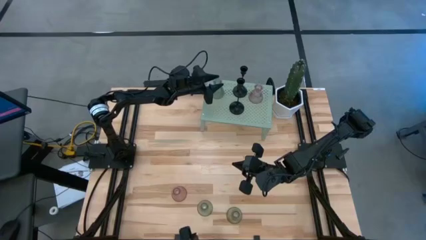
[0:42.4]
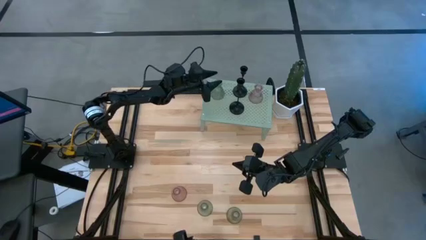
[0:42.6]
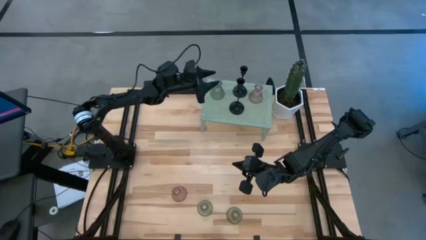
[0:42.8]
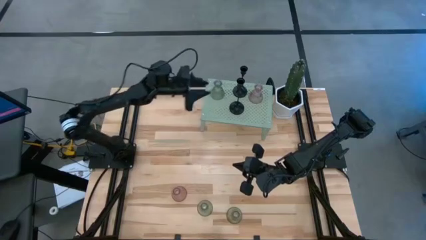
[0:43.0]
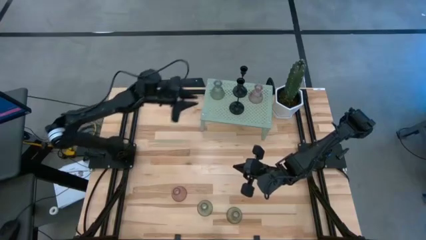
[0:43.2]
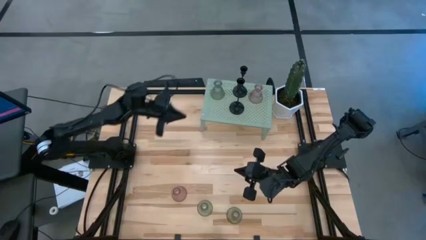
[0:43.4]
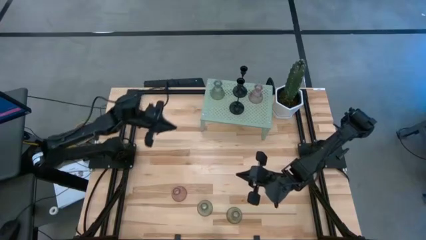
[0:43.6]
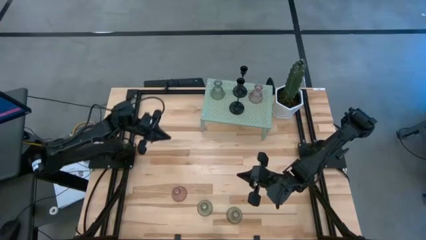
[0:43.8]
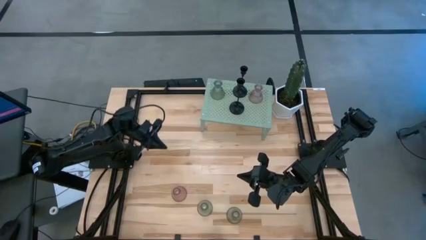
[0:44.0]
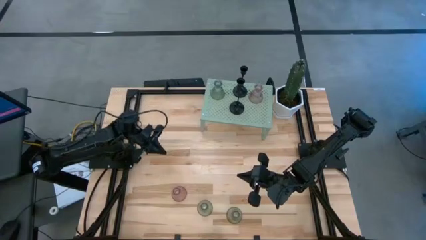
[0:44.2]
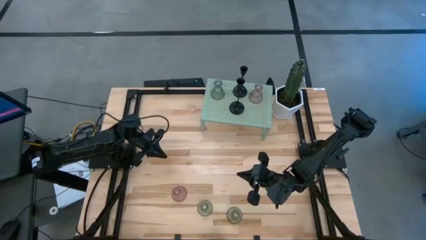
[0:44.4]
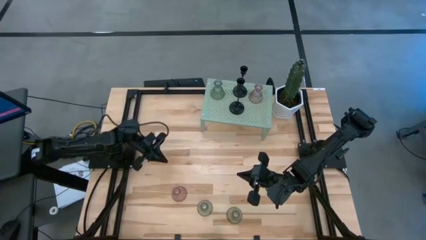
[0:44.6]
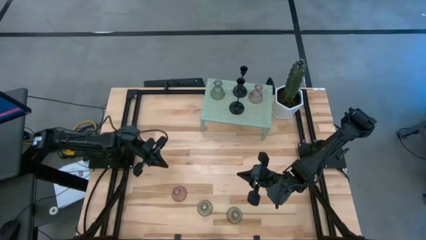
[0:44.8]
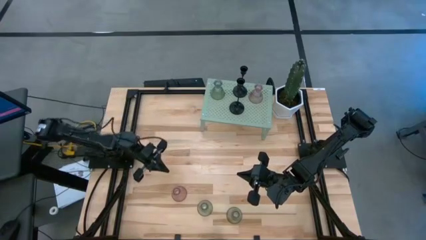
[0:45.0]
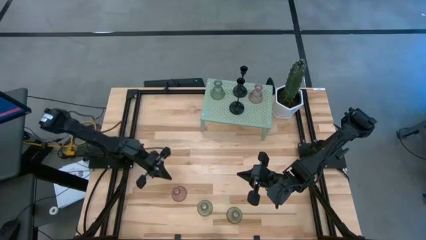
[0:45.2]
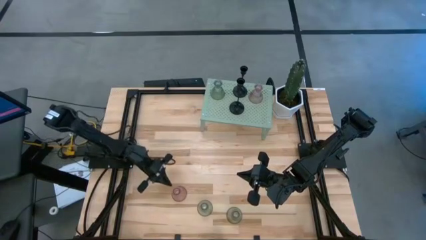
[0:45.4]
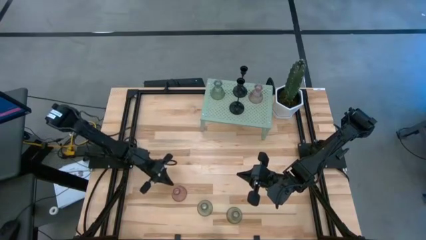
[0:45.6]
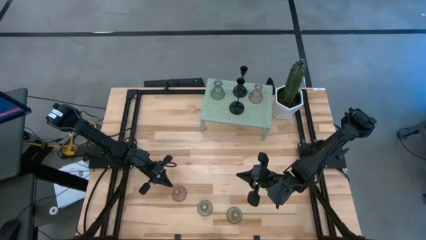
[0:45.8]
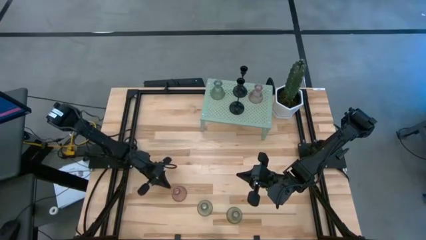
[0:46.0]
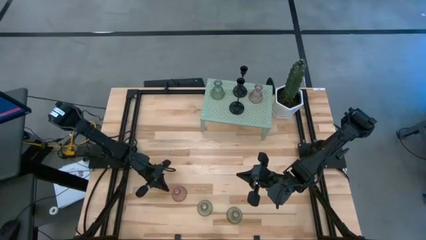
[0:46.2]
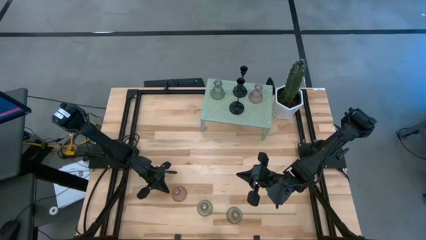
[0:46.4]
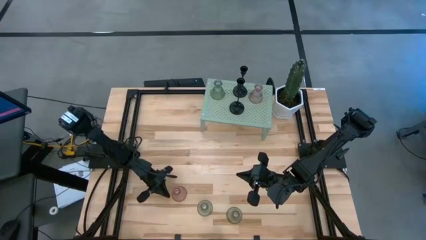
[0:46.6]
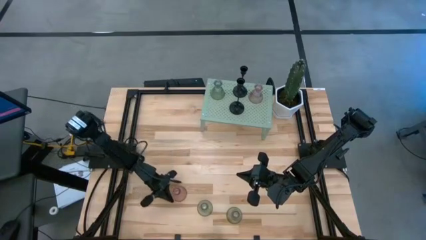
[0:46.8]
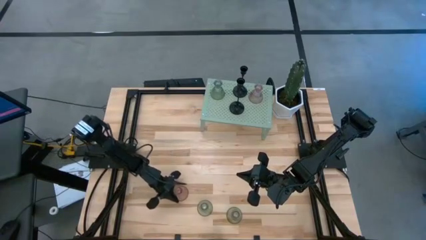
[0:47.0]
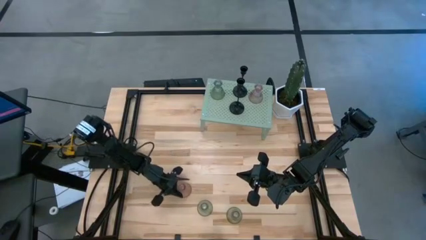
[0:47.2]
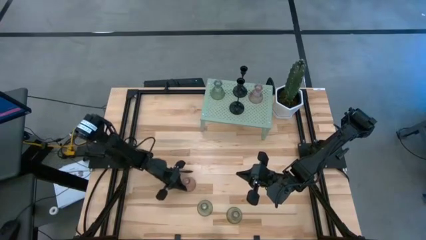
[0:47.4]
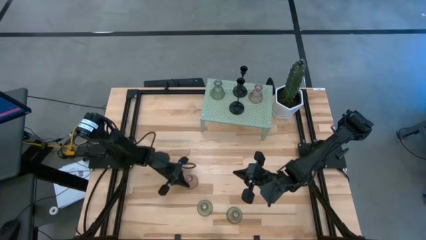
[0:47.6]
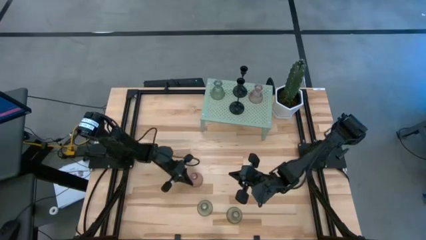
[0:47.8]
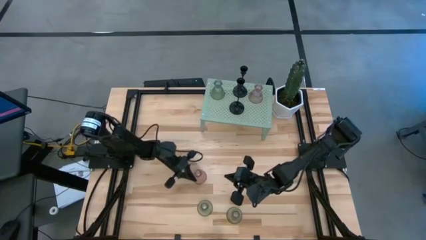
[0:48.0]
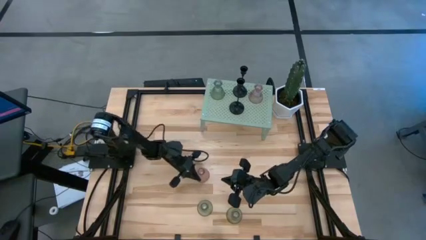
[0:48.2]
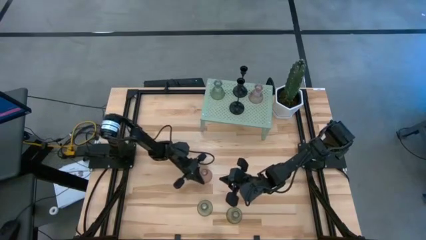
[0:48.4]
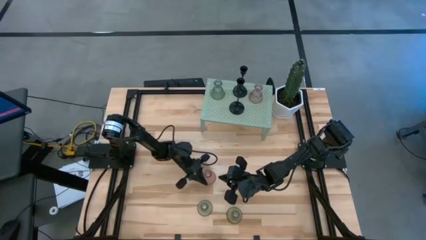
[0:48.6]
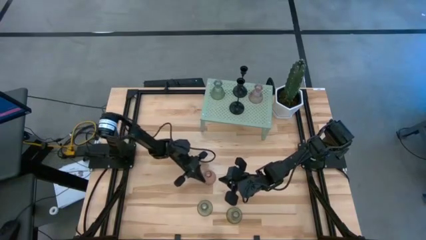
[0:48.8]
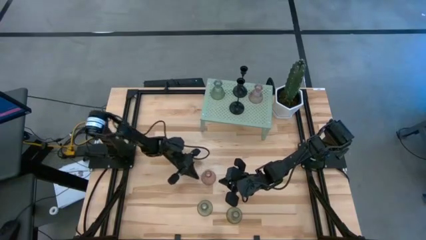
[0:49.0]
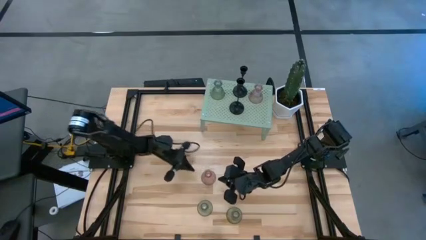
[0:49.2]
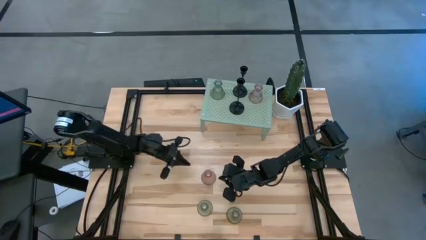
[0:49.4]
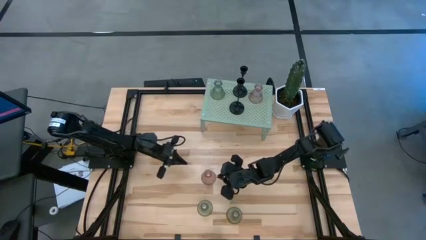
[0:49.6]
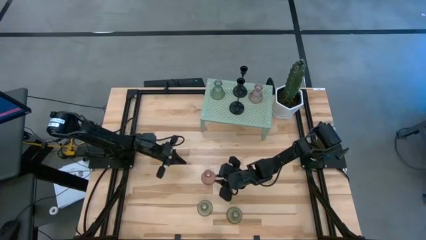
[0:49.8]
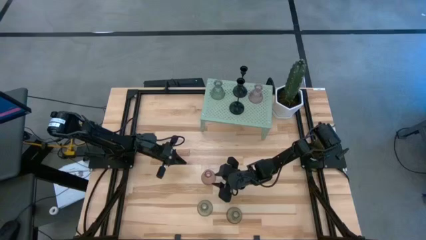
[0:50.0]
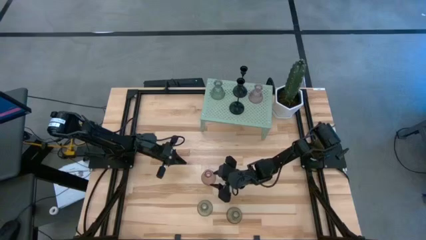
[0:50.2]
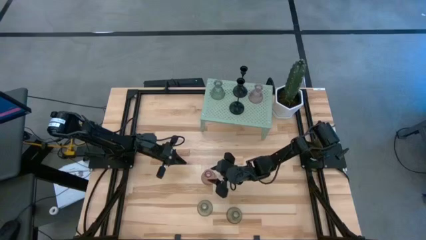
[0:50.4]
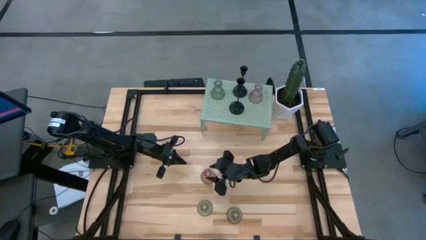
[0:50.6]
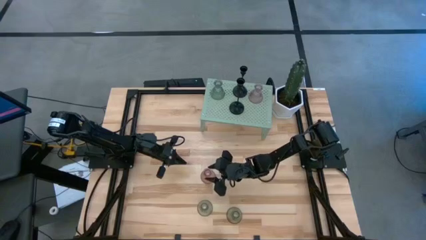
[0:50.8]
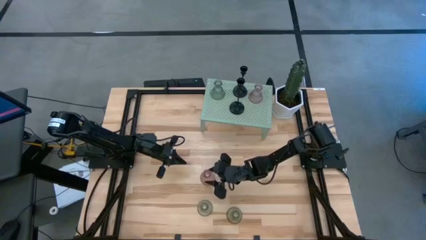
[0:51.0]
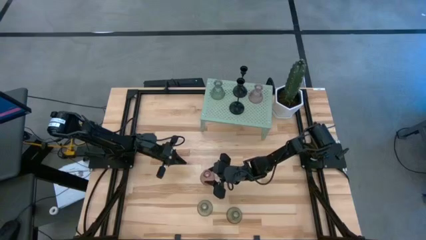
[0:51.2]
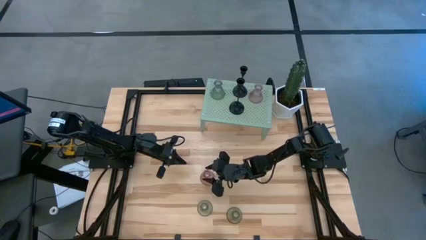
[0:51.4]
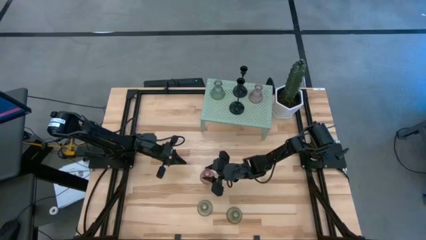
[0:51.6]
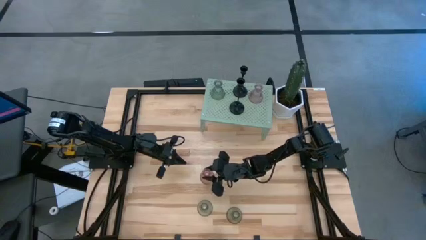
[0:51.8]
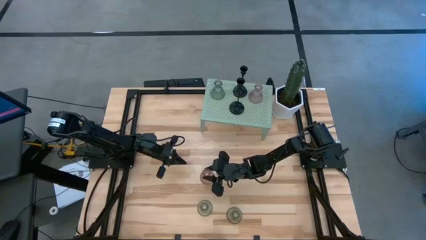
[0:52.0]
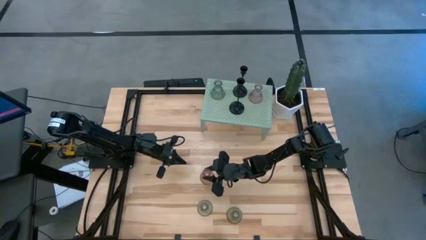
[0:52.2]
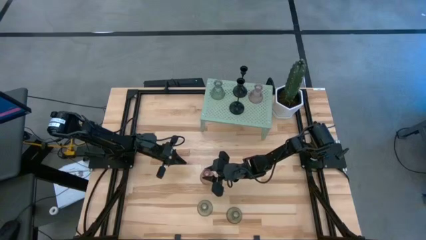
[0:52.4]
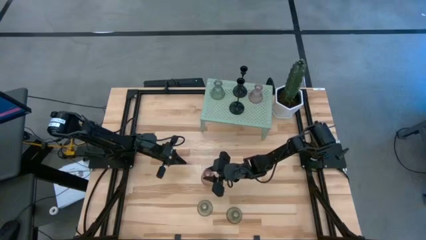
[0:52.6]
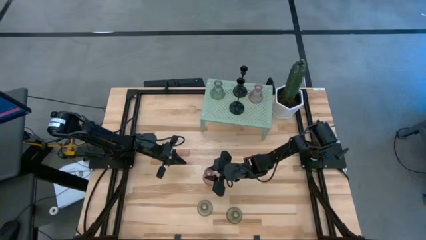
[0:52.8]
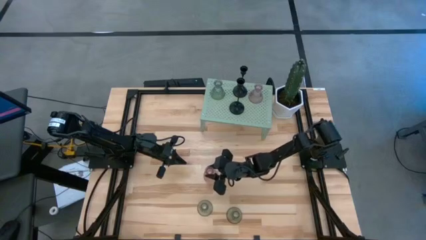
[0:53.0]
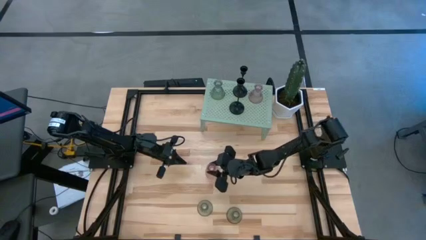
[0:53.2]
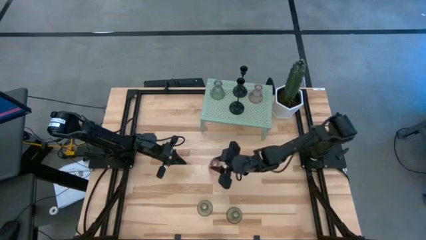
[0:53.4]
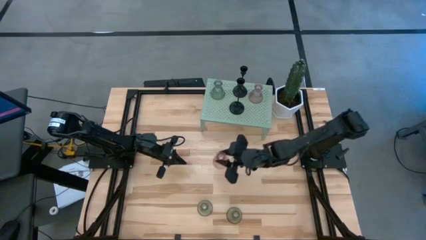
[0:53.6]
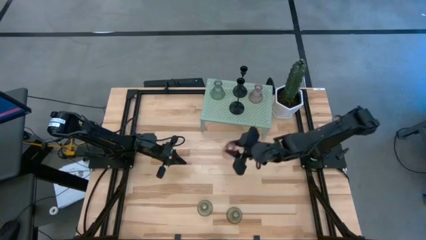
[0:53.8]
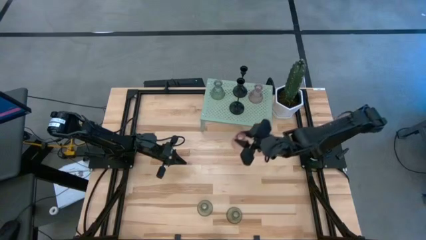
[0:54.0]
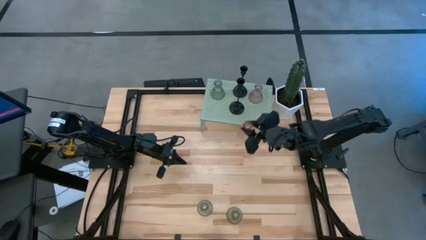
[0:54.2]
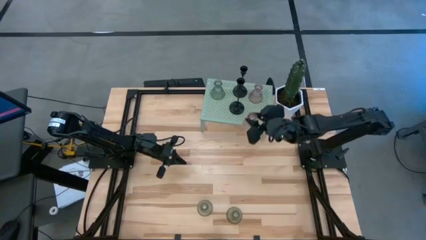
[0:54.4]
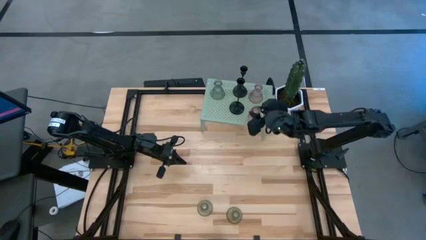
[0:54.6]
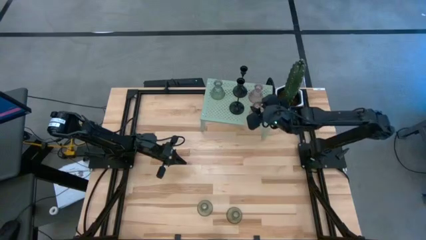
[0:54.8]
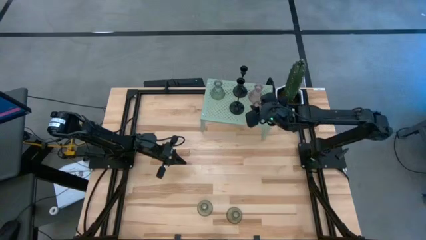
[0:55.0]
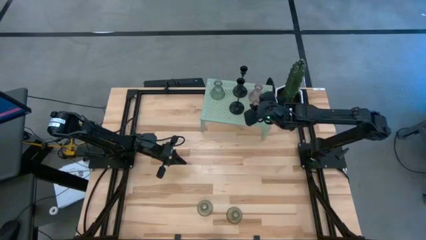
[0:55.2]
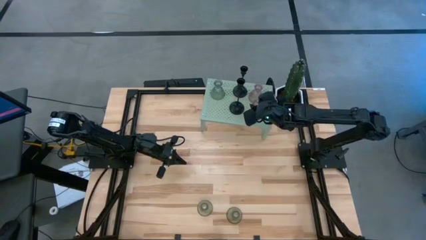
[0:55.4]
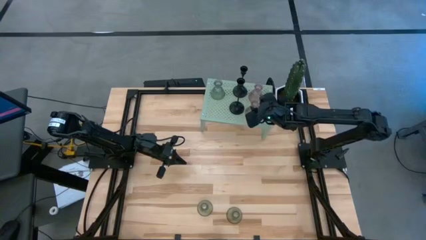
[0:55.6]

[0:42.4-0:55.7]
Task: Pick & Place candle stick holders
Put the pink glass candle holder on the shelf

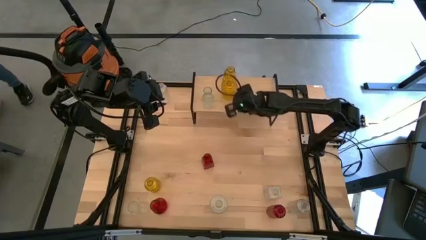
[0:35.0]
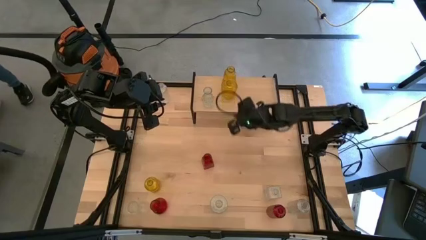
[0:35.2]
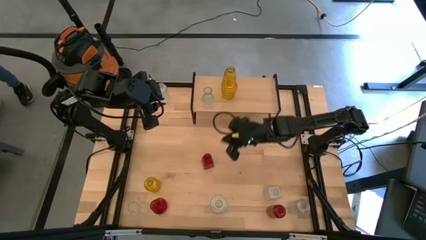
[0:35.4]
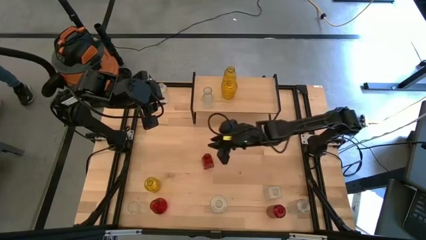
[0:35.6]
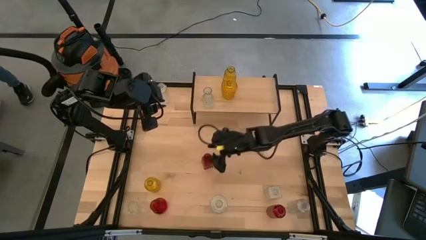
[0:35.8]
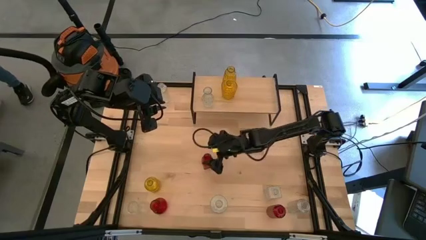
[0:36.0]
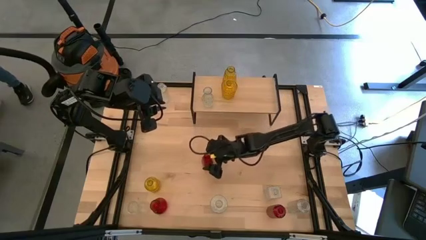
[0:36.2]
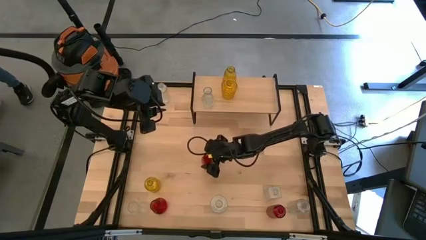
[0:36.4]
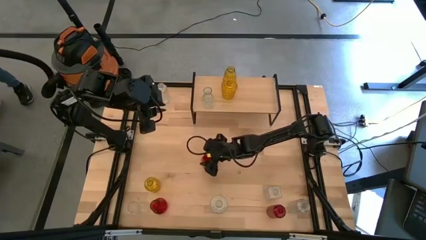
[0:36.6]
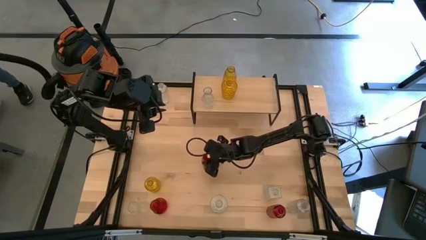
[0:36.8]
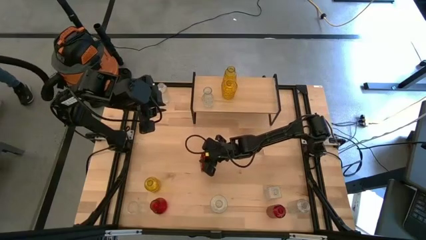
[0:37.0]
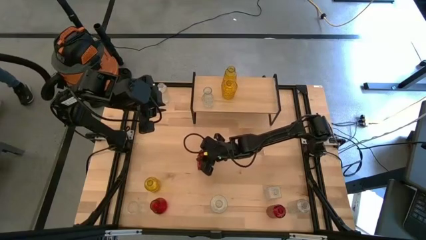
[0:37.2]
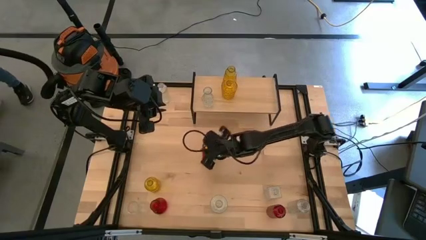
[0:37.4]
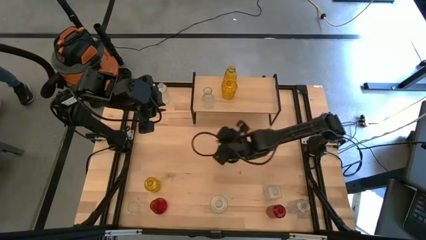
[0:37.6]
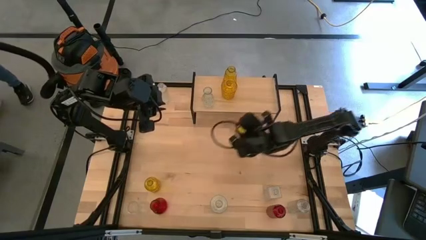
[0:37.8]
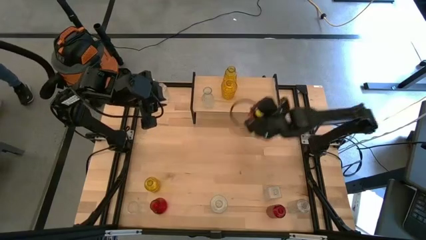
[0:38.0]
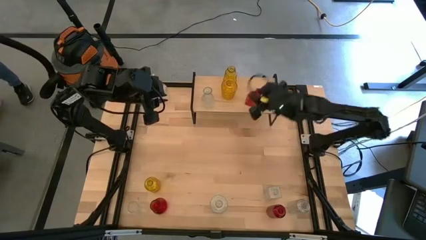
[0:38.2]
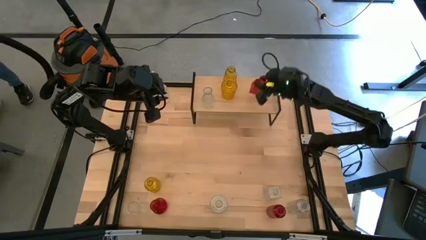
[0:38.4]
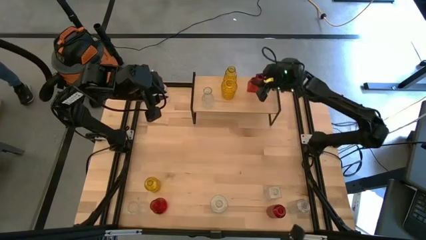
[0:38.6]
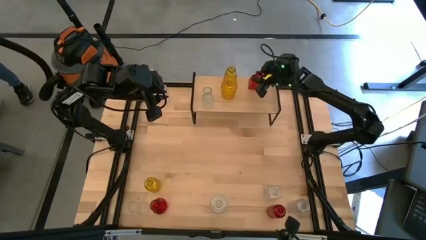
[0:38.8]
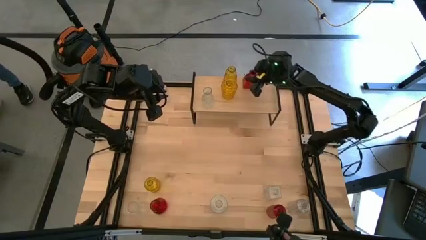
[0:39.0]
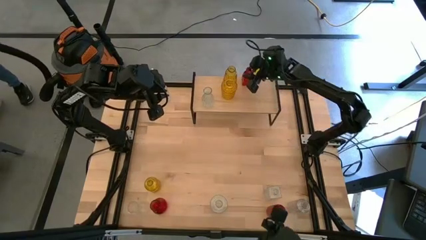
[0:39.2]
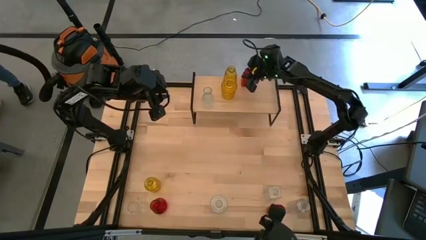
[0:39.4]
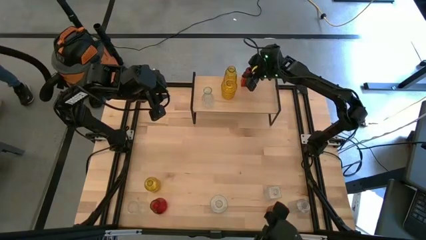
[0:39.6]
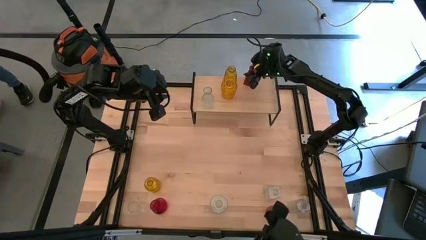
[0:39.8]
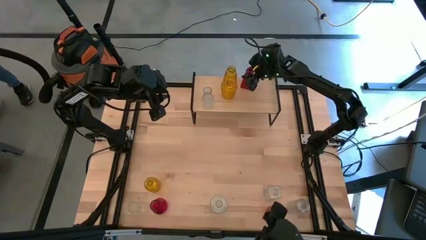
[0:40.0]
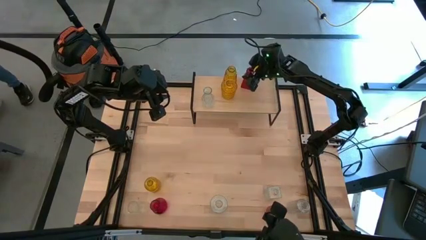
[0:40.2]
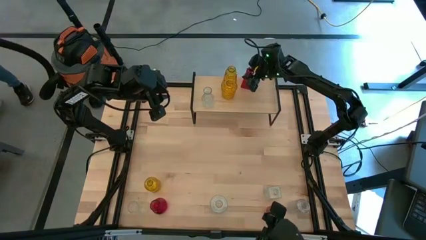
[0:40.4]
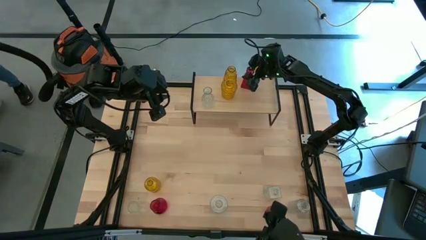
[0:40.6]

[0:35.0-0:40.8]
Task: sort vases onto shelf
Put the red vase on the shelf
